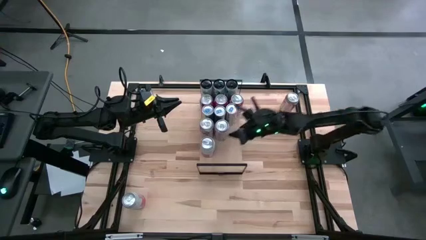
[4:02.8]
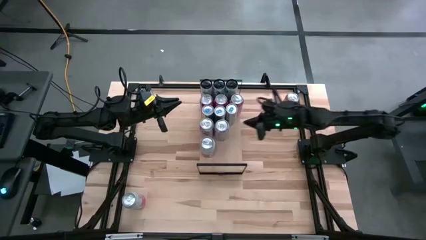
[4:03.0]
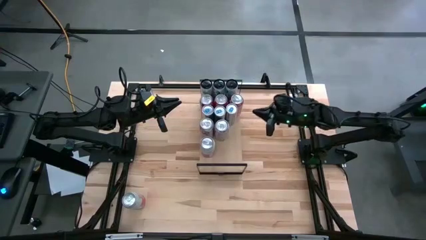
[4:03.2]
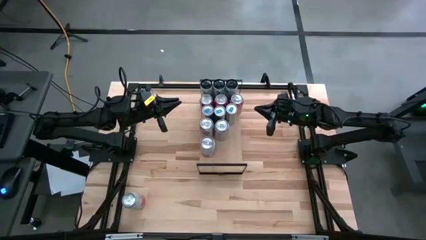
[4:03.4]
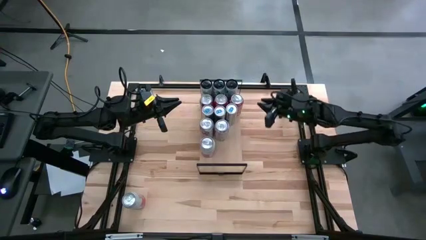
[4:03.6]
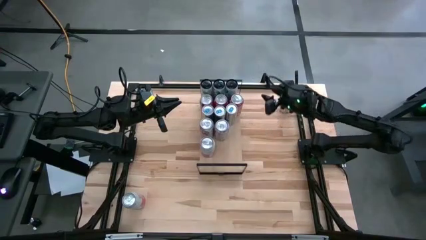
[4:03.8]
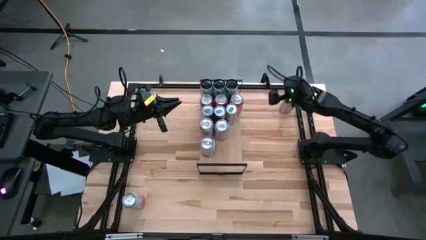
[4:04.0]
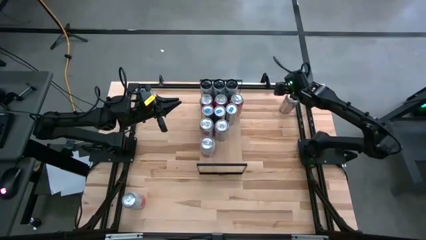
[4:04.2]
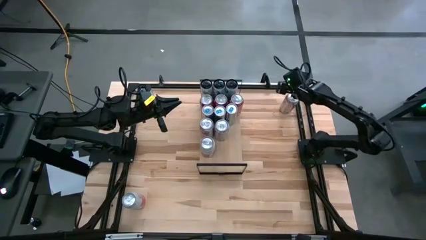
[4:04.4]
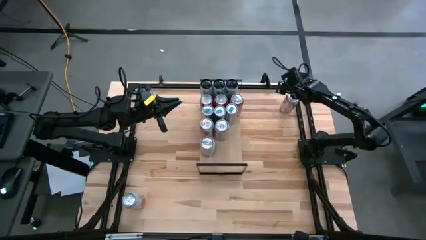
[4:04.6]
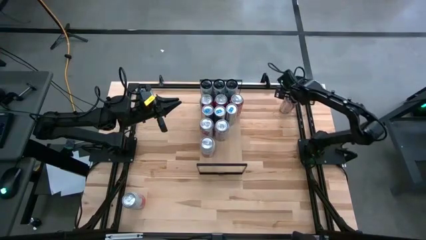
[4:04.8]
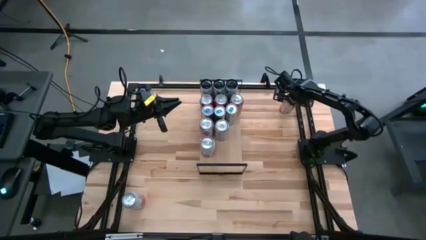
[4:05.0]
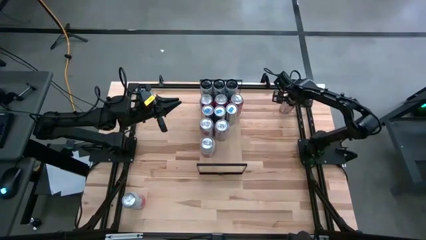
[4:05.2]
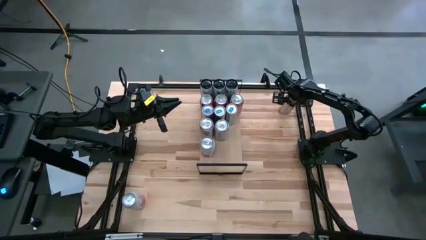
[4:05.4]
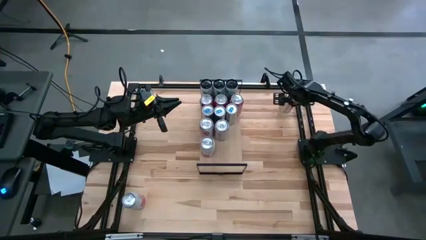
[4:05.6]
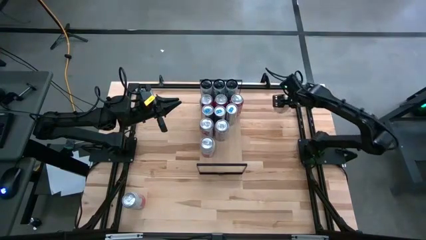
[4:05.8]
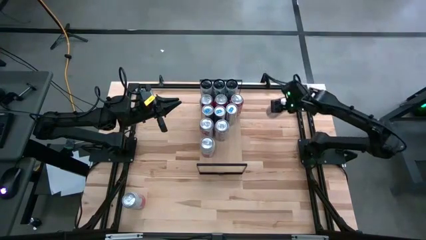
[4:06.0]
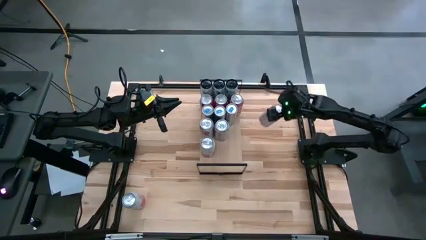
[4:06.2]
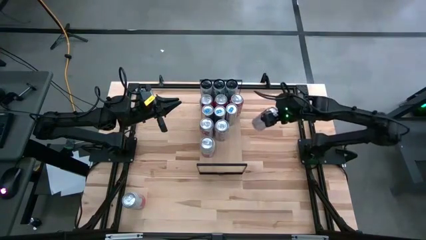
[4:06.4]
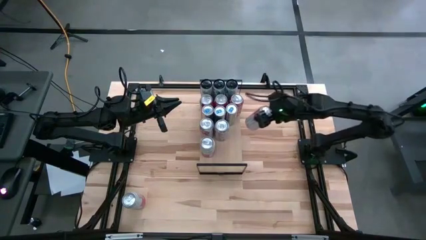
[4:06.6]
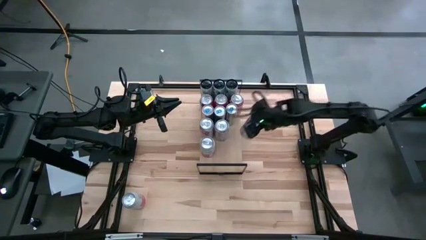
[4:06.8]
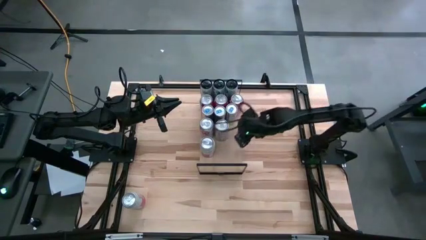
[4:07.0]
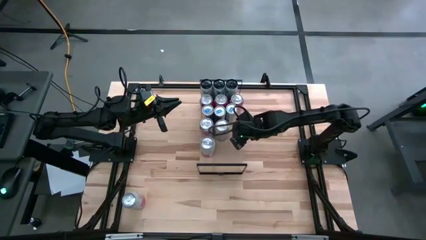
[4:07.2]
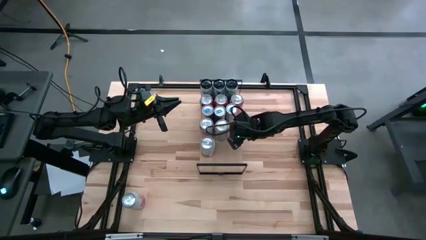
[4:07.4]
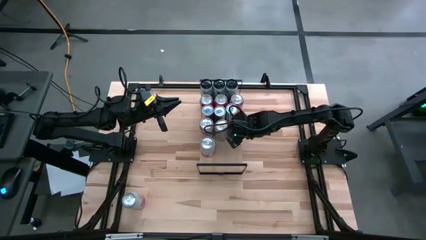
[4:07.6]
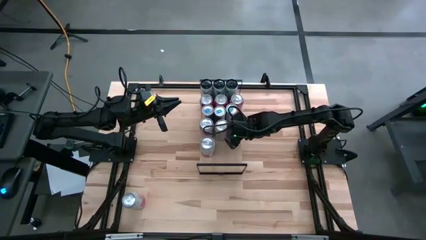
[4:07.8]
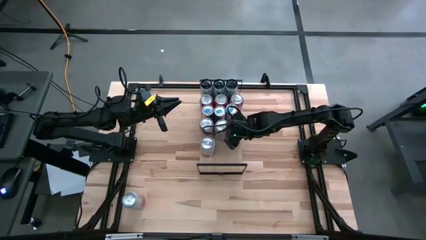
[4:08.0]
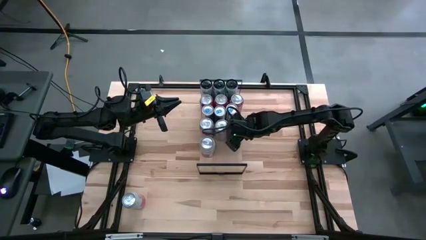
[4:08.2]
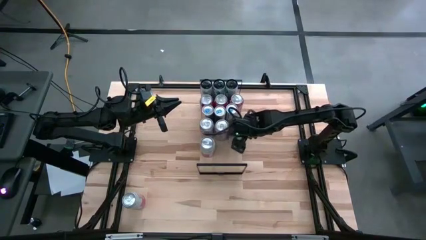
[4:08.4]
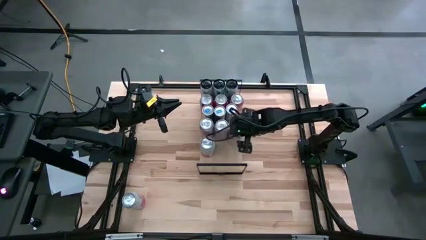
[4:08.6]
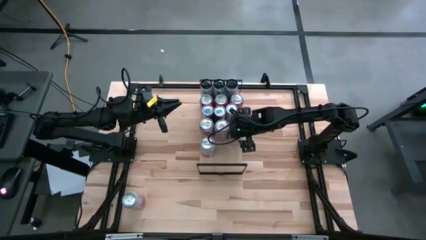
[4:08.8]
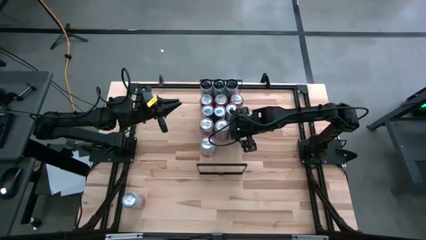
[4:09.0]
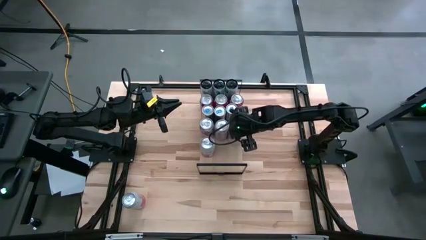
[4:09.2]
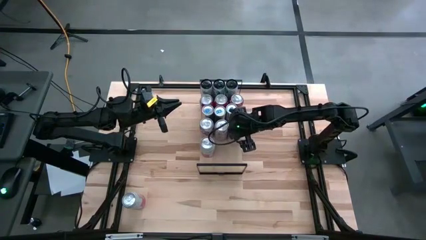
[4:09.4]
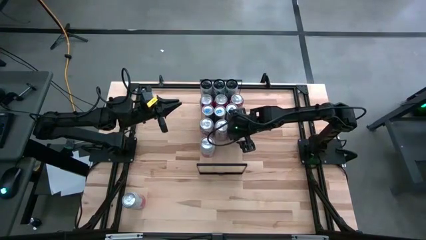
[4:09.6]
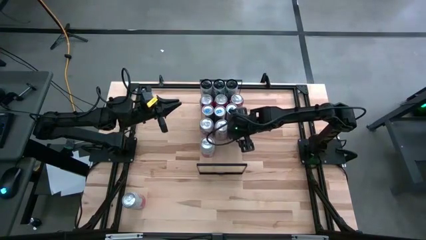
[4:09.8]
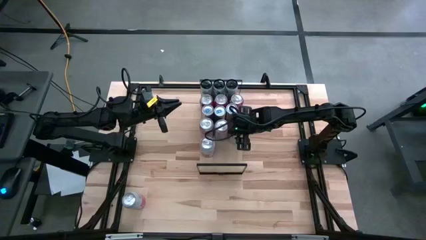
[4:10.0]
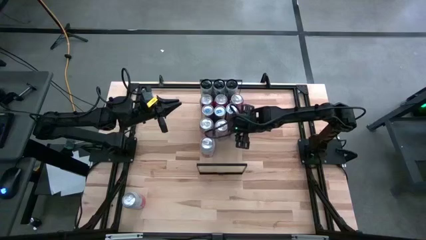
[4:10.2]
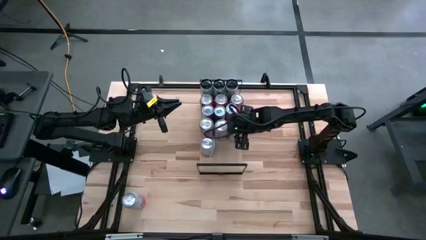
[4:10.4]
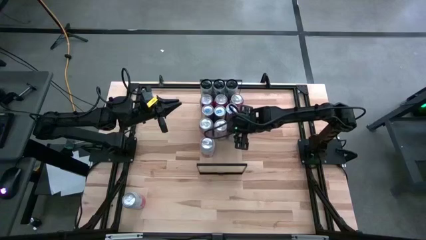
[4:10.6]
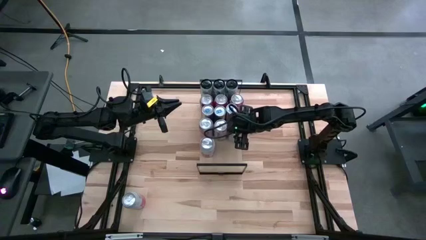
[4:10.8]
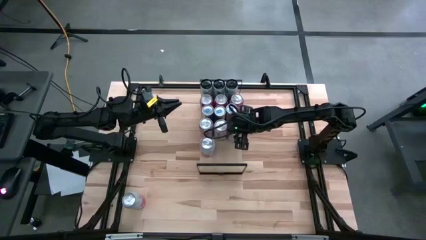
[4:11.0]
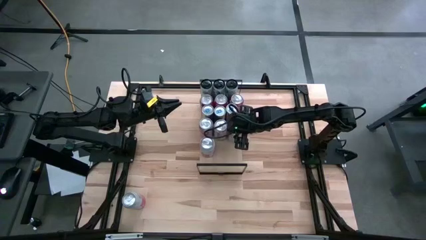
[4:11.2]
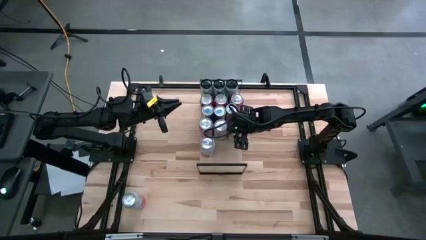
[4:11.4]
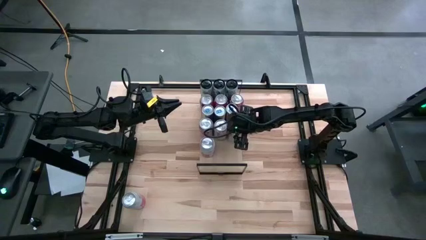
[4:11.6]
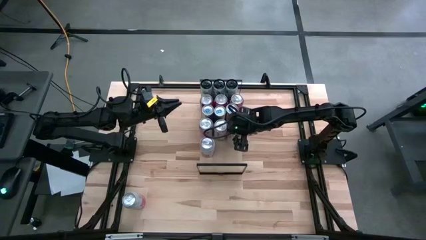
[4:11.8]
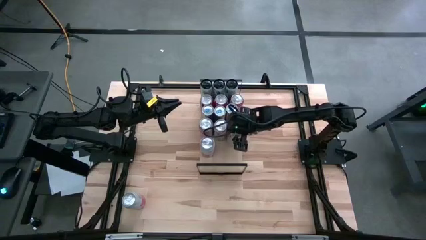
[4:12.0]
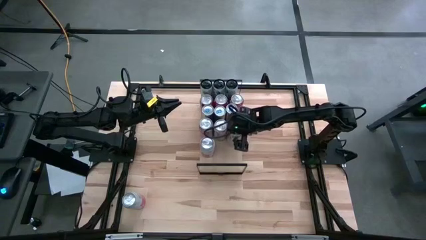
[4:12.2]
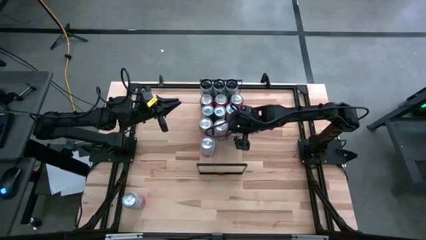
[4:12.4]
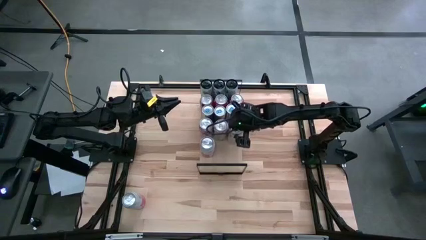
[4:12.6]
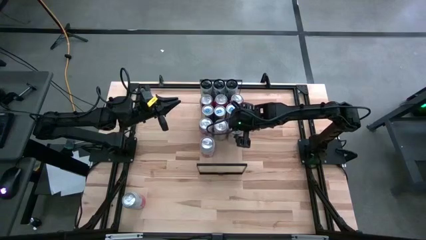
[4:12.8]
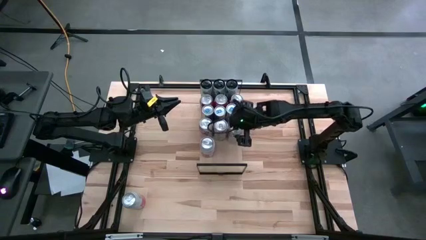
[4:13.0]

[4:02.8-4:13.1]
Task: Place canned beverage on shelf
Put the red-silver soda can on the shelf aligned with the other red-silver soda can

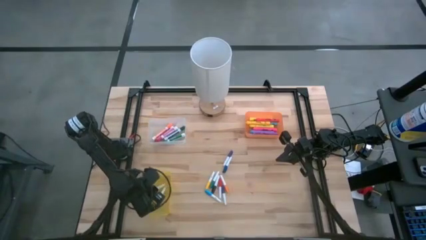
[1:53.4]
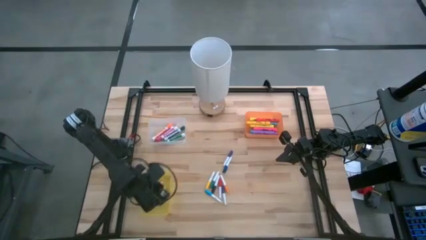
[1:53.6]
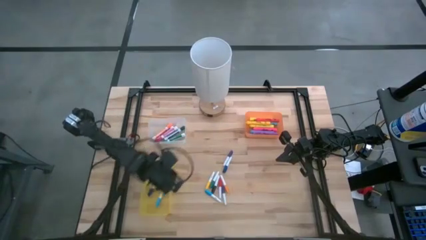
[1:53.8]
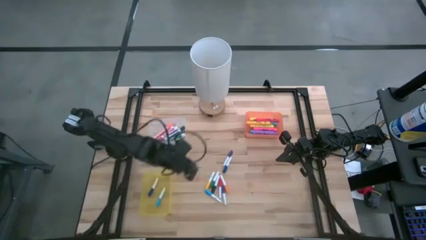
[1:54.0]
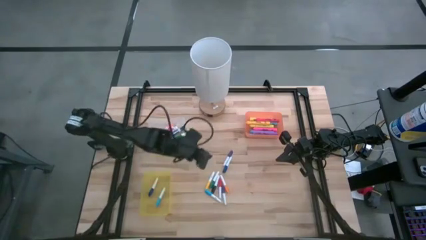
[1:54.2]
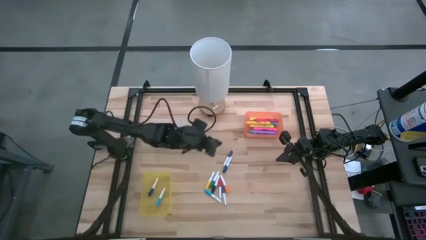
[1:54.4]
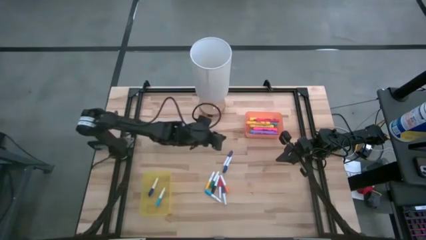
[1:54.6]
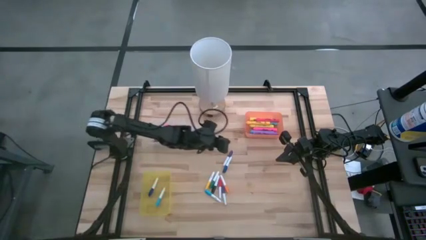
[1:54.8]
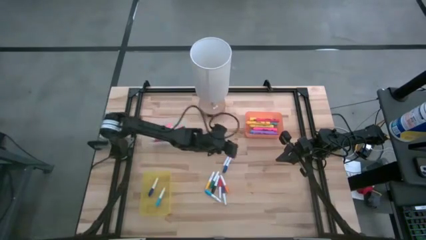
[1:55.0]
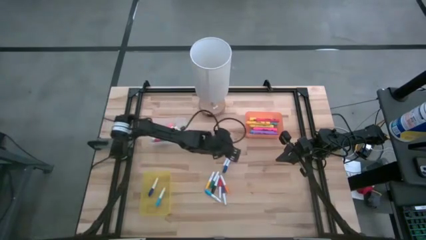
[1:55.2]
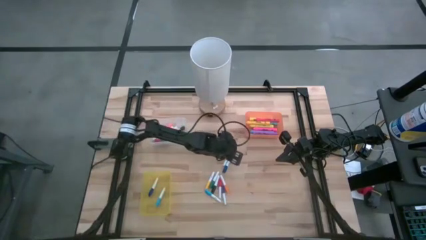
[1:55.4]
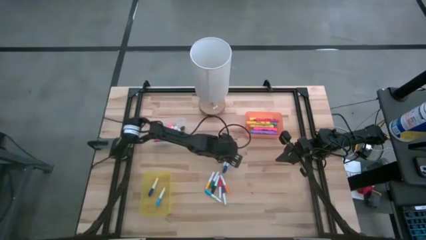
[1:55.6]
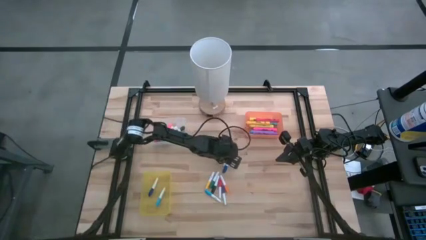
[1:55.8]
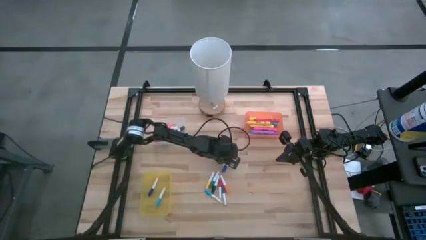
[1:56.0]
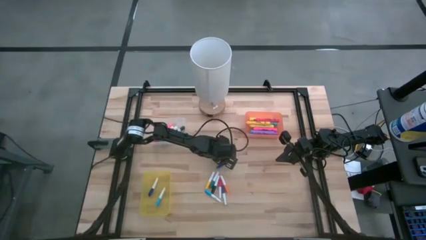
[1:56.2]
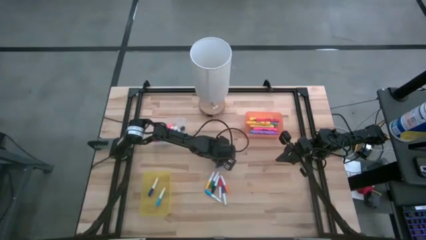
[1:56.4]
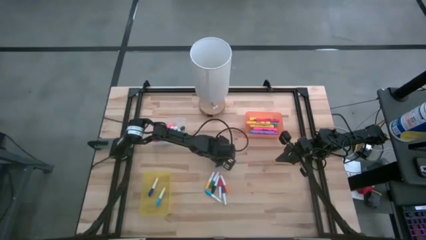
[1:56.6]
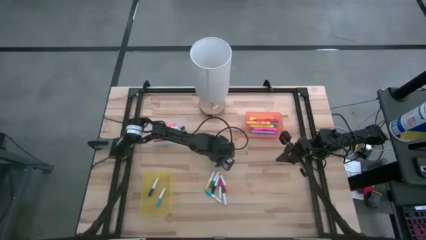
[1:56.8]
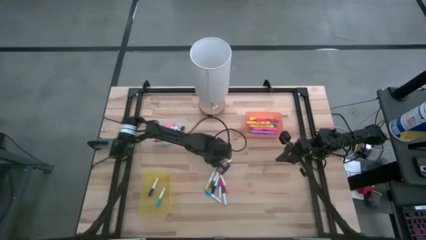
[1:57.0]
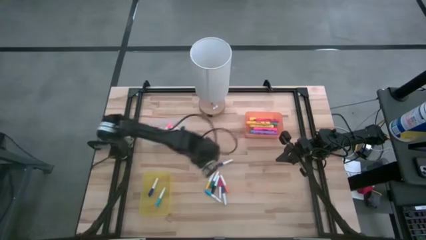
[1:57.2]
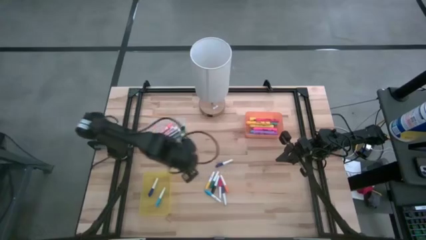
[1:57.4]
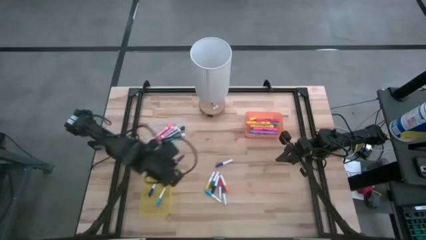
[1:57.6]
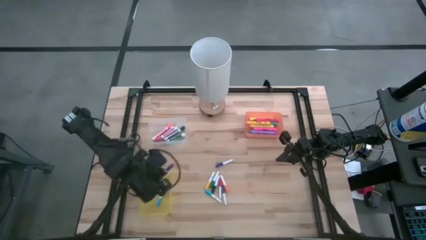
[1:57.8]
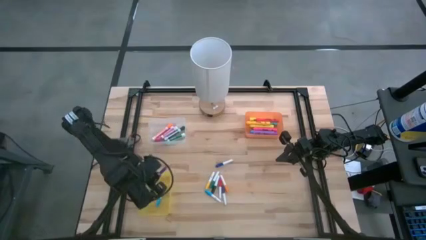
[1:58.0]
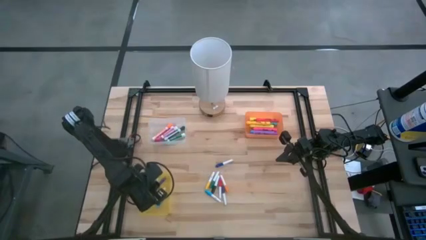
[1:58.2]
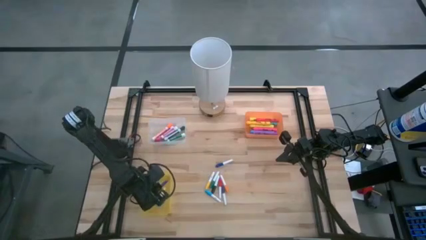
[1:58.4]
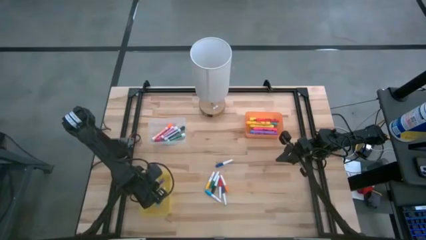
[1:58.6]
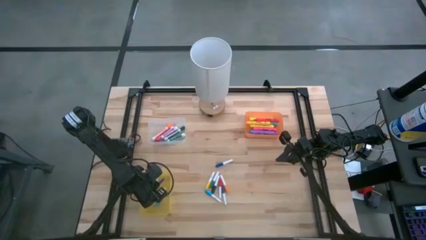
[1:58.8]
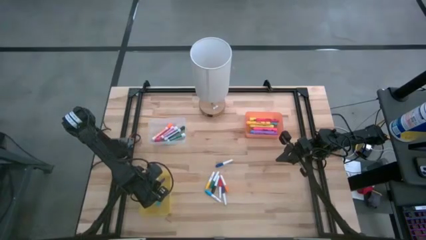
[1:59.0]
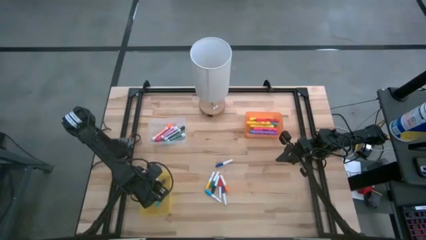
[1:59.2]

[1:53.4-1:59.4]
Task: Pick & Place Markers
Put the top small purple highlighter pen into the yellow bin
